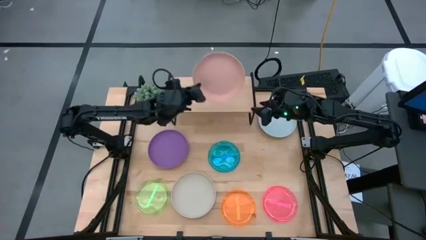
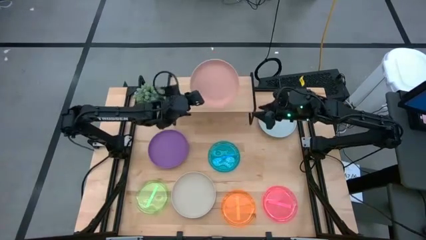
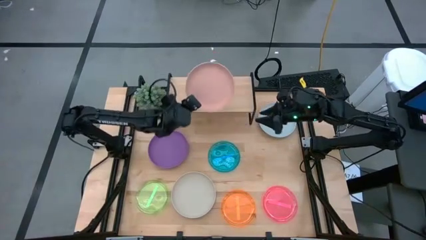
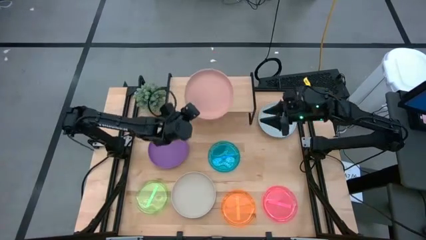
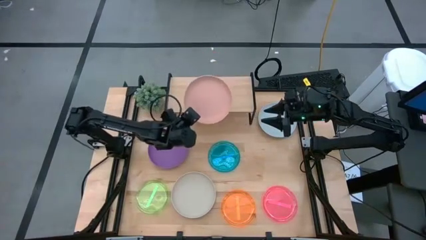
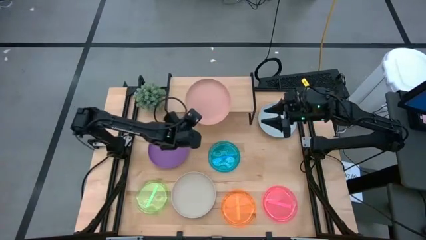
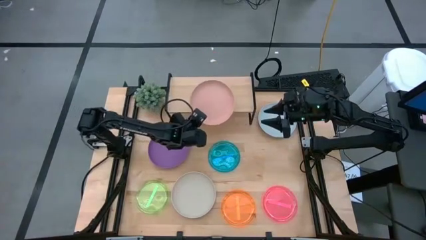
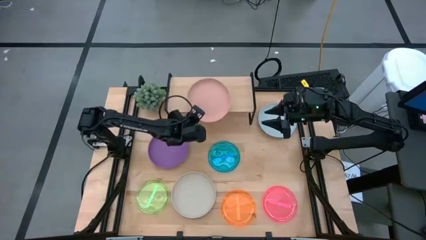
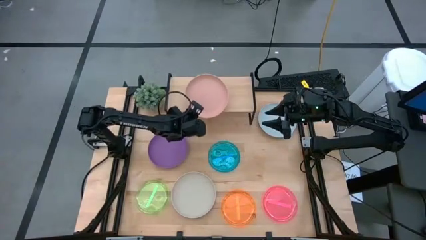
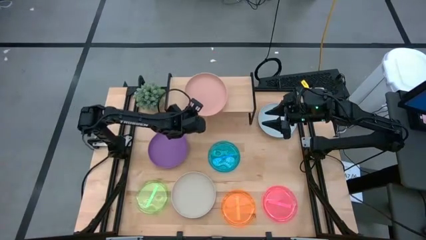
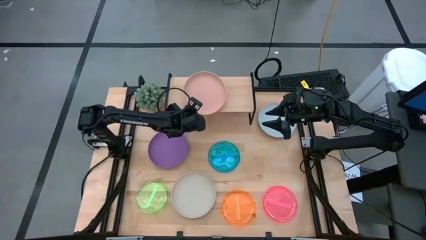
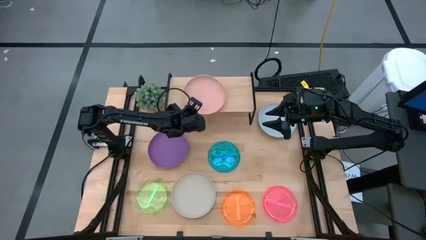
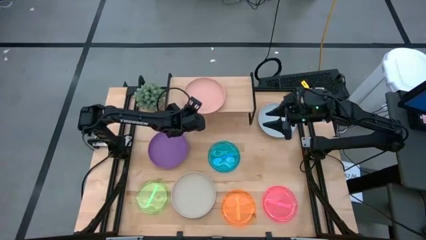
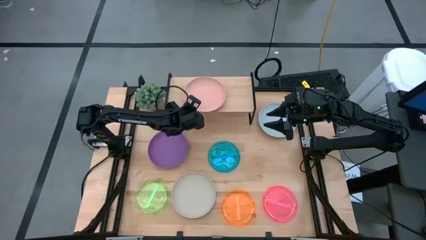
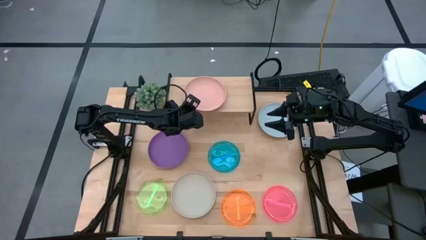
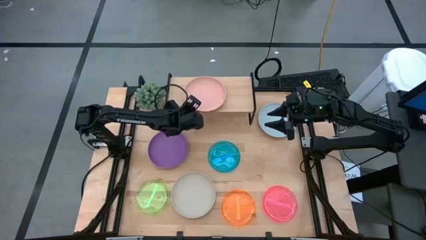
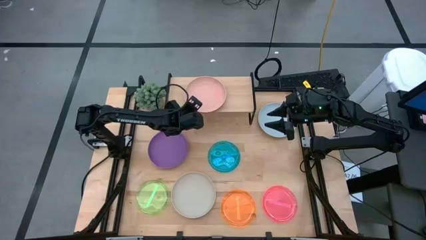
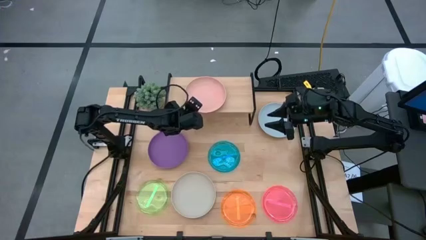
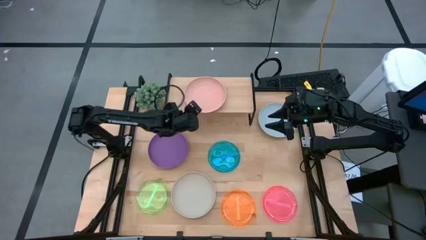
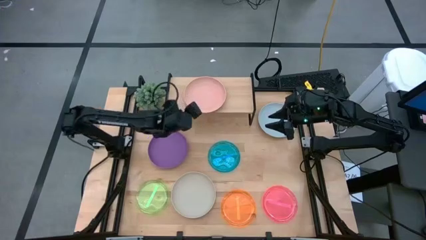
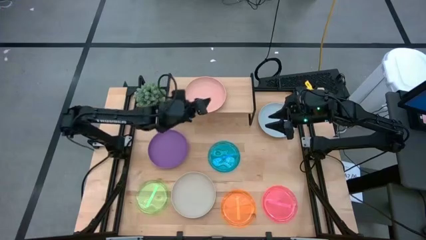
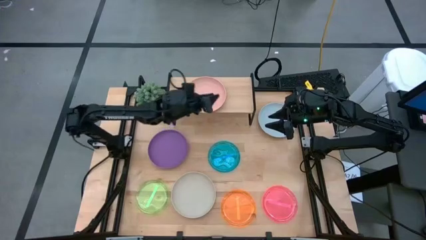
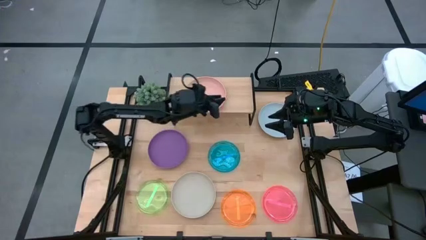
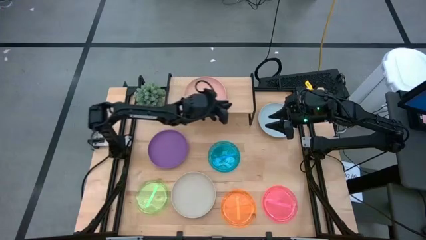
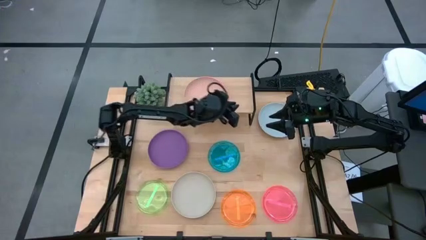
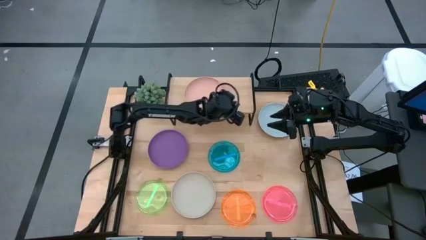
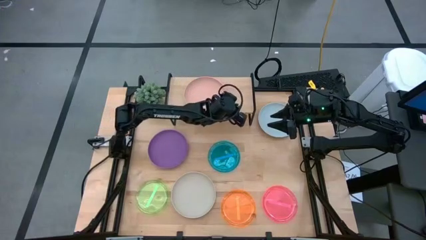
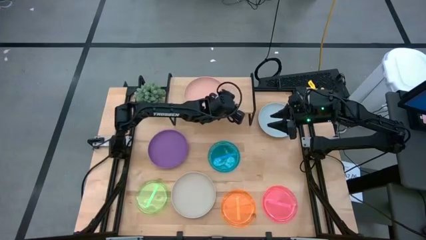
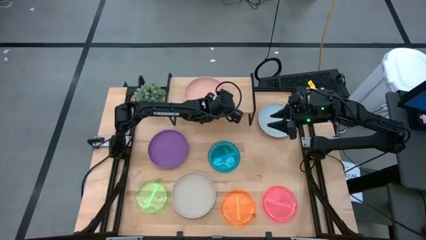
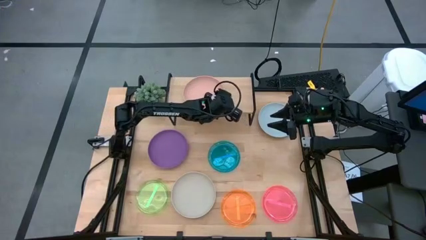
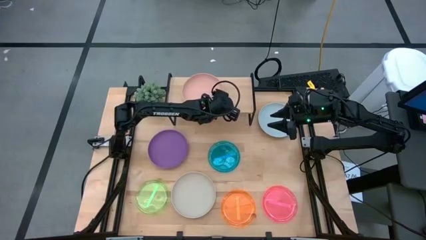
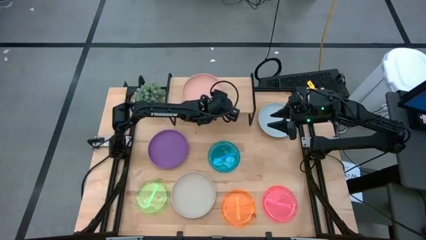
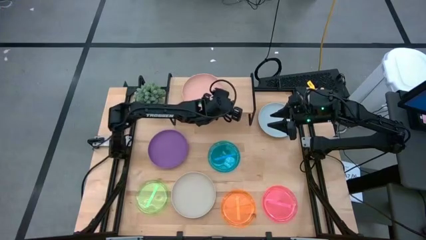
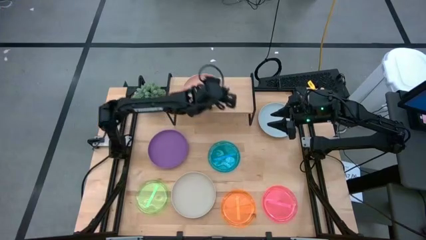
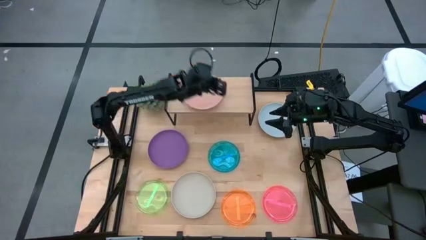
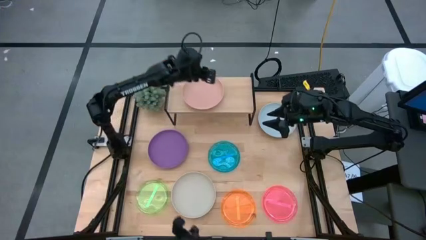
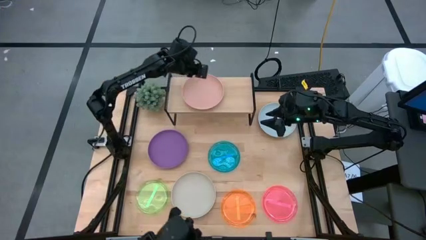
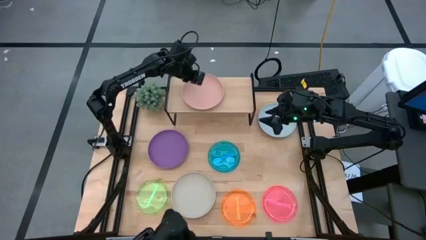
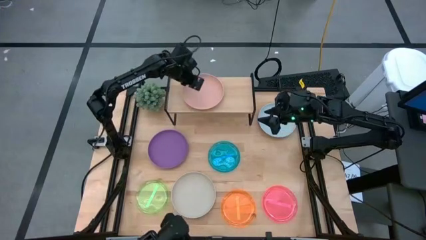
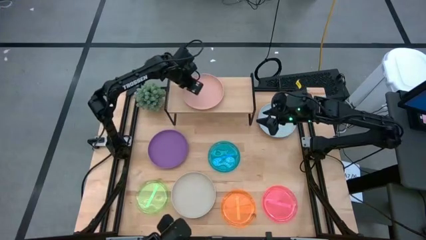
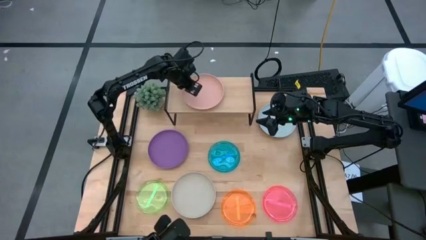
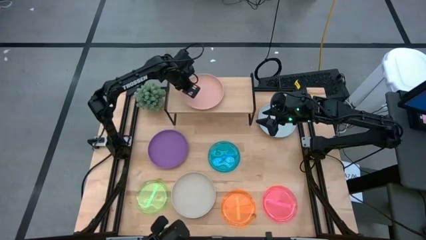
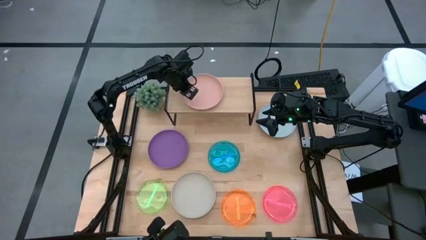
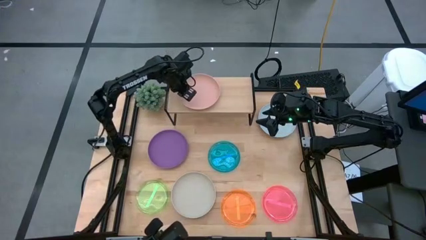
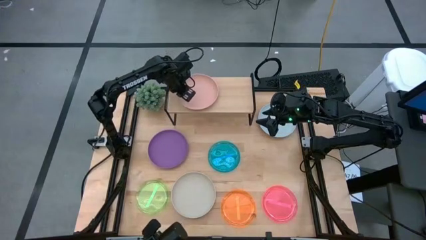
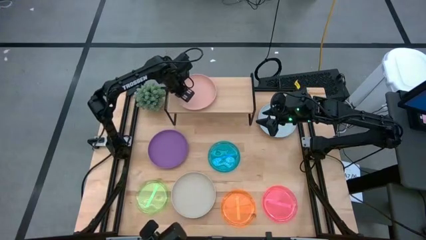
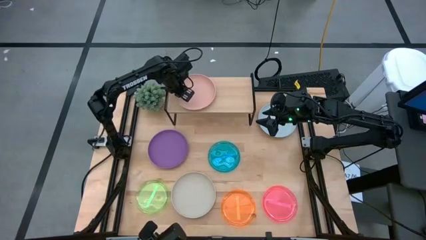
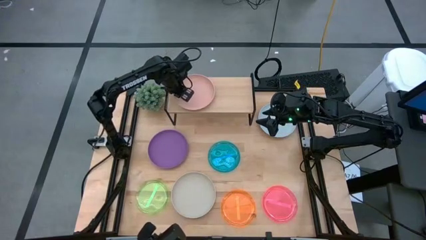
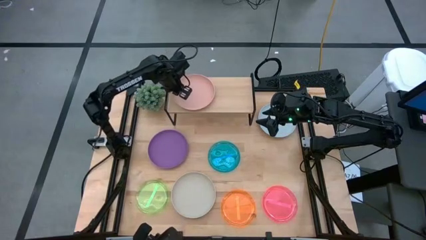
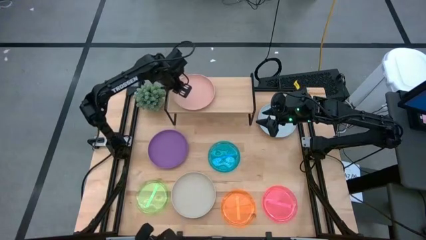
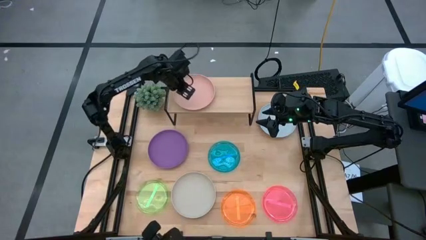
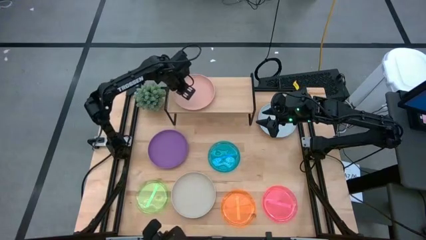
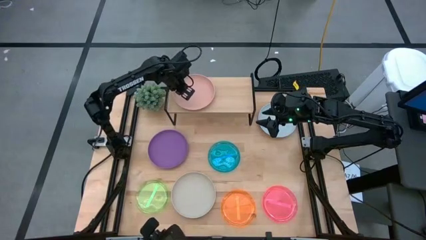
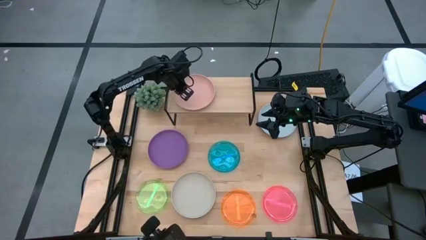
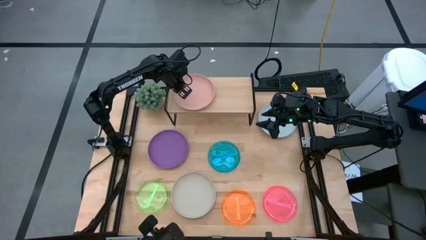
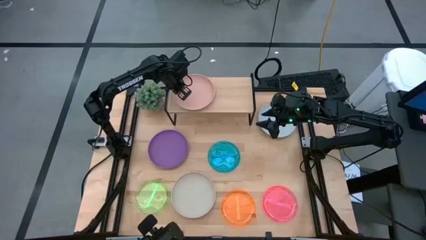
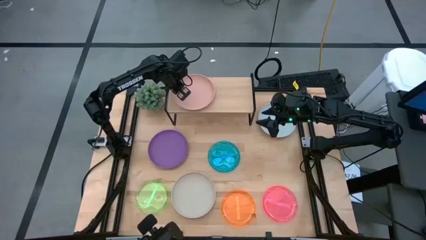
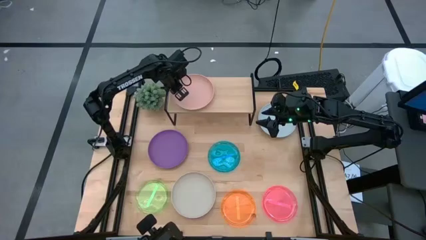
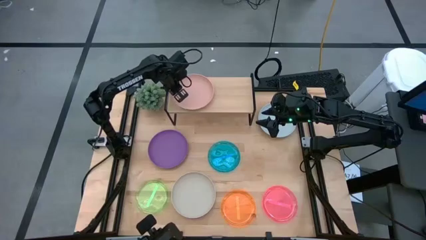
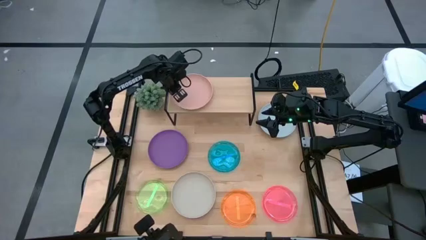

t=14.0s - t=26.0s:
Task: Place and stack plates onto a shelf
Put the pink plate on the shelf
